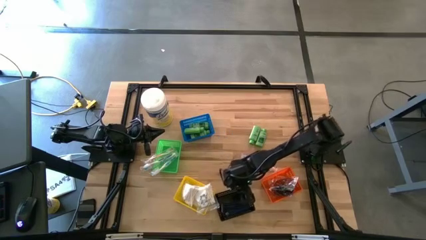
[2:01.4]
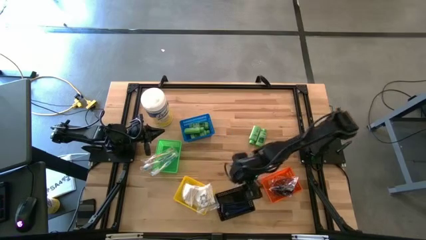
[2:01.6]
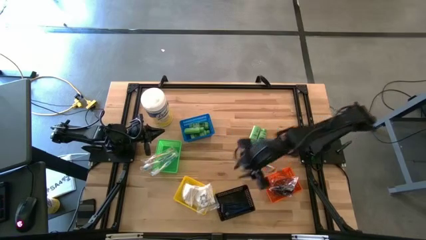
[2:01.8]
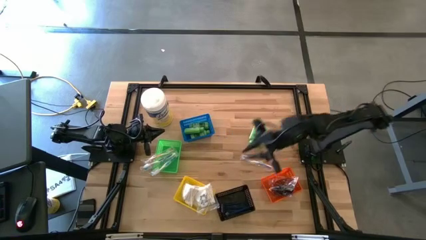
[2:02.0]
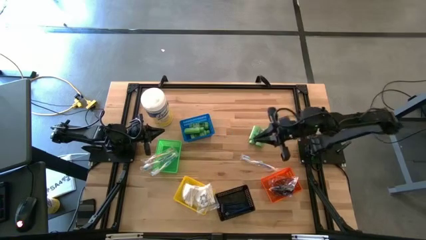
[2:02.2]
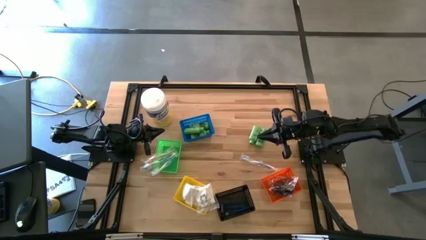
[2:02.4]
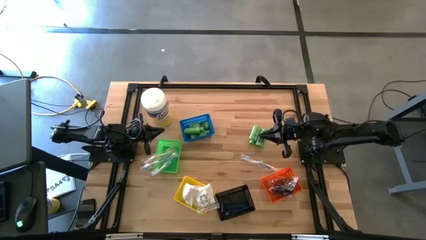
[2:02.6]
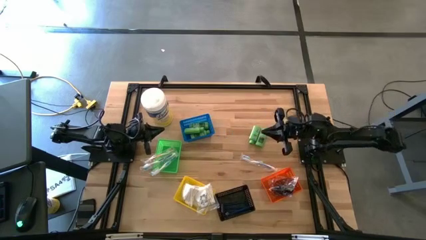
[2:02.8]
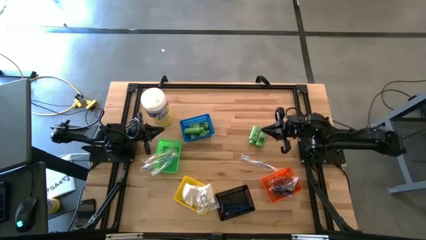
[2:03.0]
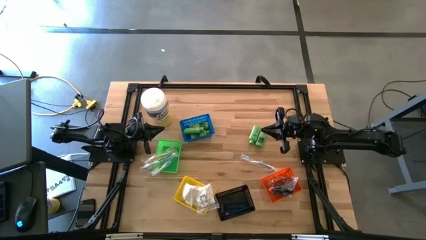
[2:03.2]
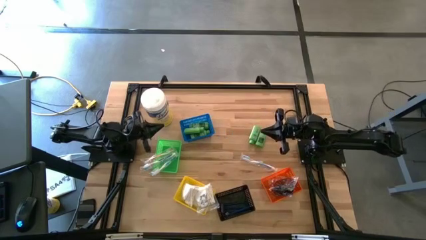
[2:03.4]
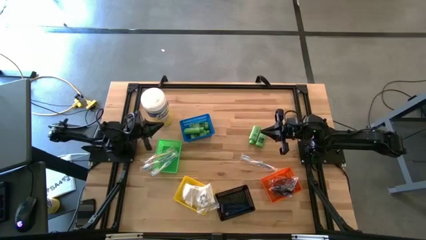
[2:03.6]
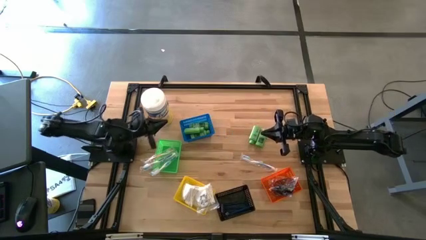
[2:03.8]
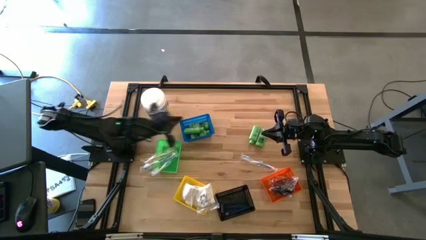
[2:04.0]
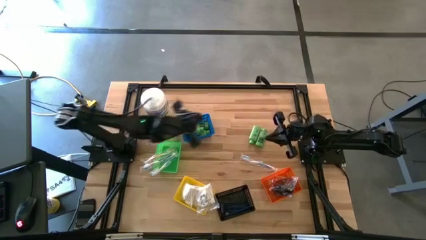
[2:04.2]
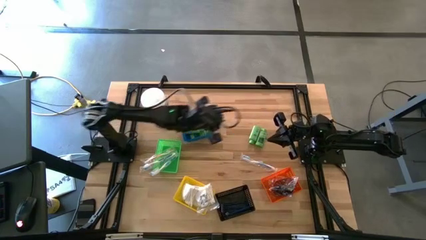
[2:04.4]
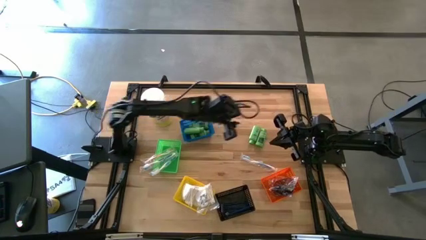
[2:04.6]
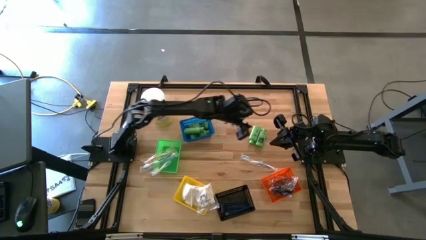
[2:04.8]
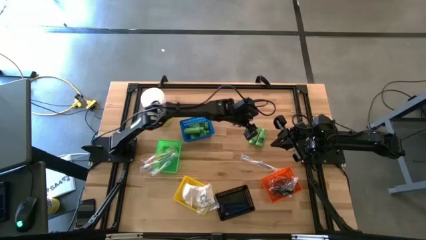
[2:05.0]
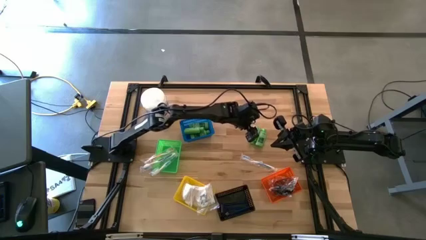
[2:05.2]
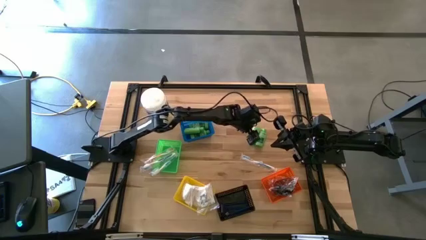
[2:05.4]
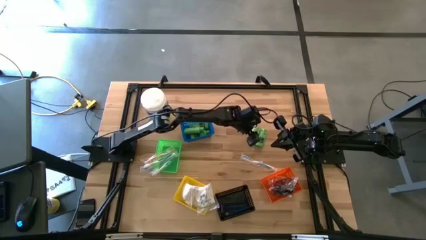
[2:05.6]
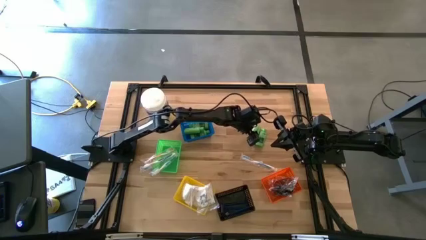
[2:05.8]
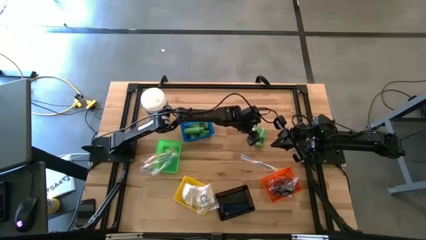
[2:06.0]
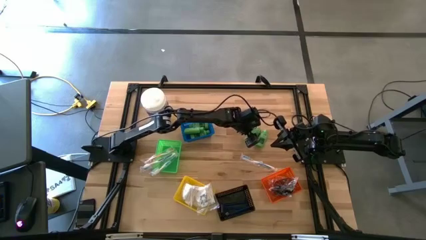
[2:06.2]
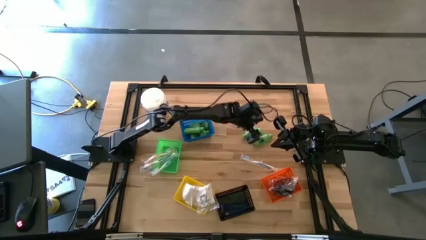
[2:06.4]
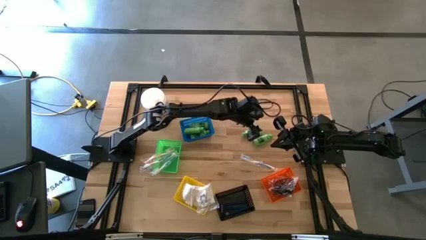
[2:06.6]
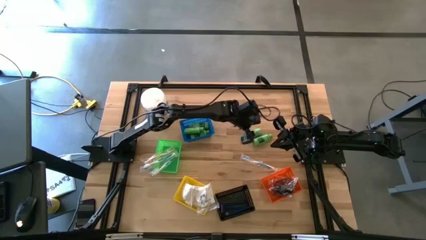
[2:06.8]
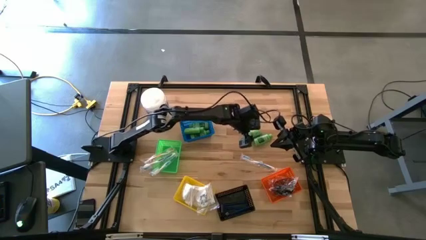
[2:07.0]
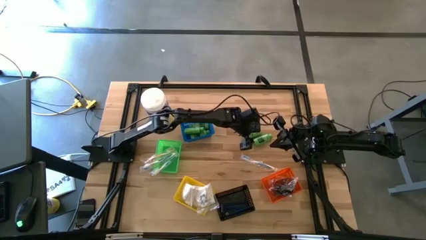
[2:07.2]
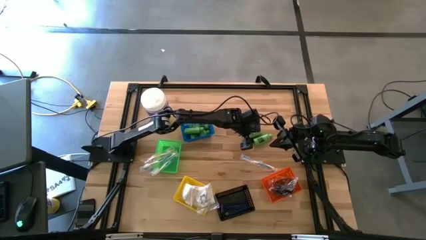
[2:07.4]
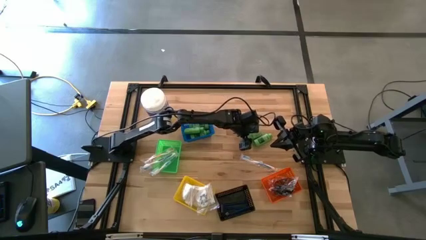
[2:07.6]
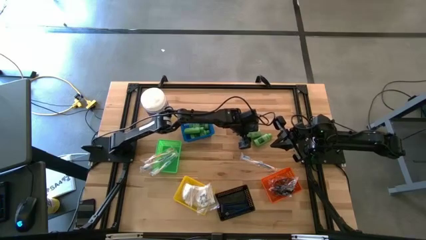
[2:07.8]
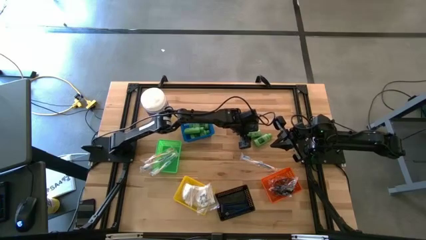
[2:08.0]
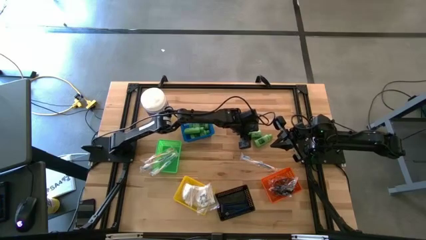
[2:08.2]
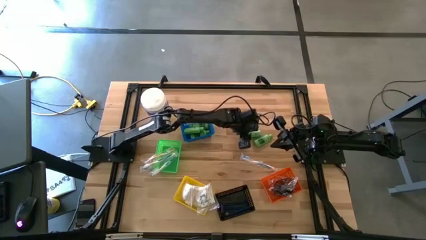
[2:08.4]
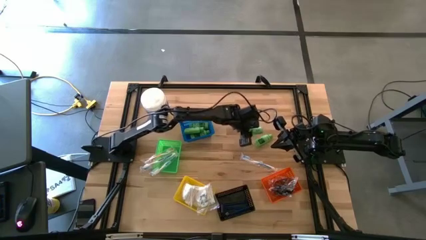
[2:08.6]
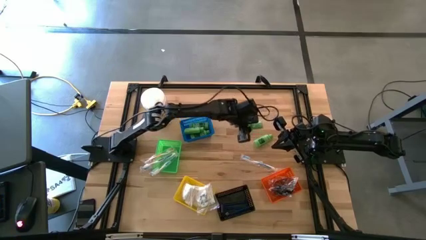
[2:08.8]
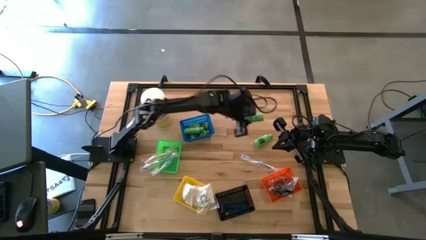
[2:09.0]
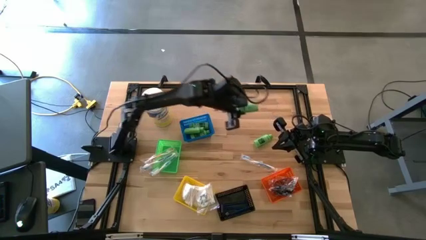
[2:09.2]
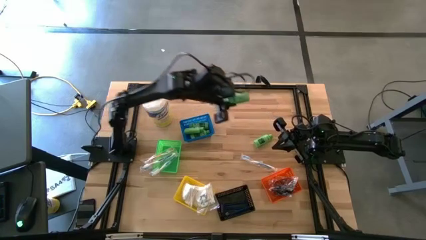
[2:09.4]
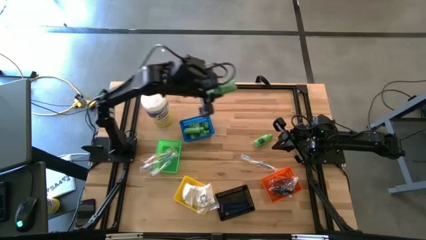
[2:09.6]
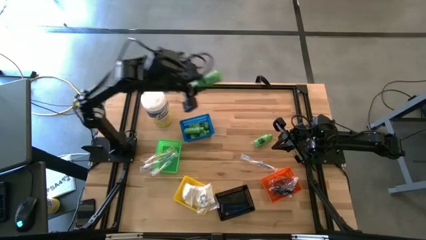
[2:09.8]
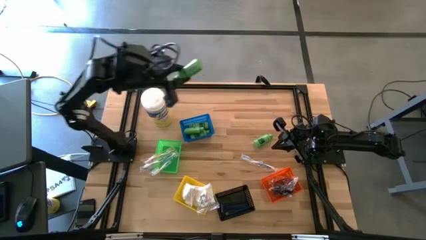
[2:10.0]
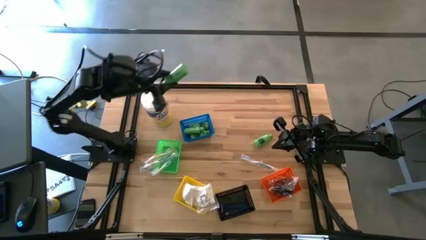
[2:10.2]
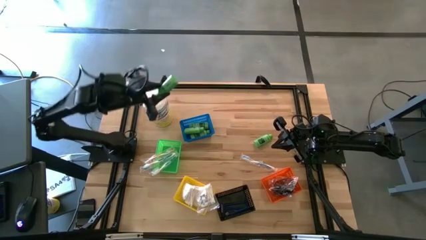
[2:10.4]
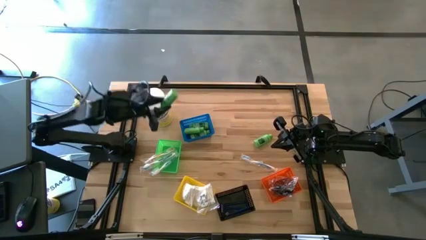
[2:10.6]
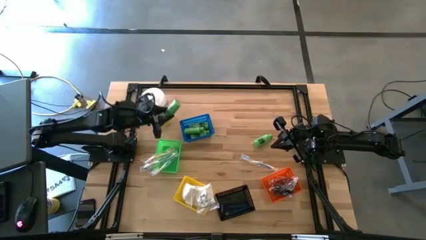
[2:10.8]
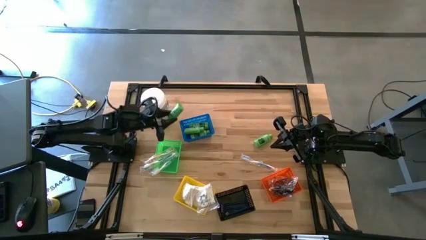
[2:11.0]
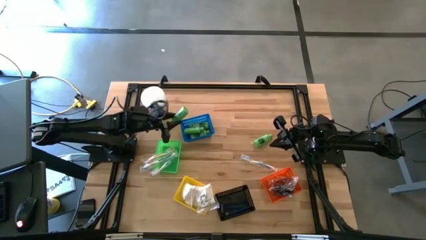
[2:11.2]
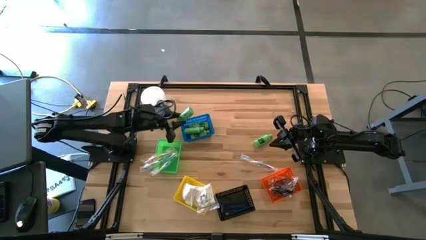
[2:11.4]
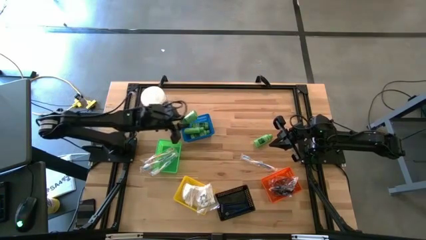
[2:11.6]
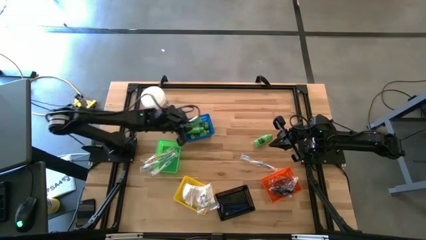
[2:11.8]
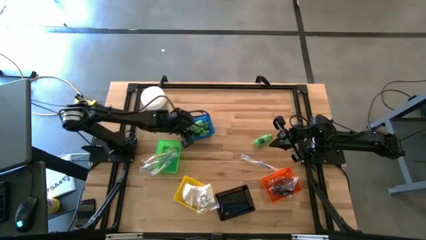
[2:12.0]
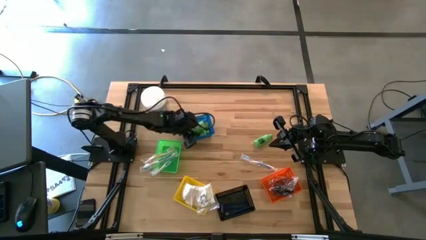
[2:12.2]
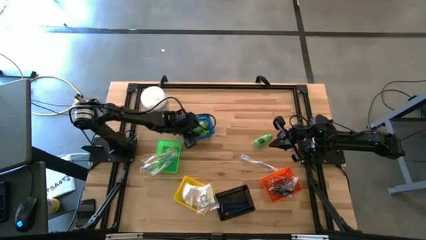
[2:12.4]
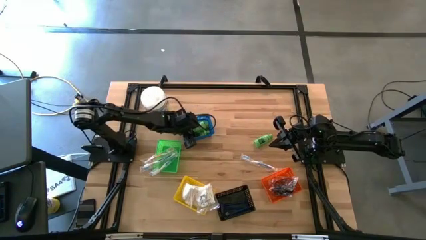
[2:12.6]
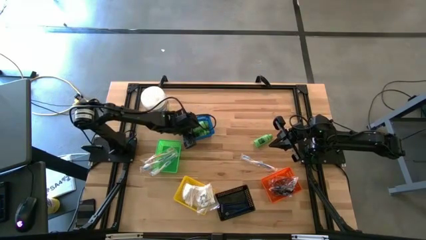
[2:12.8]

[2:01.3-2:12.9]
Task: Pick & Place Travel size toiletries
Put the green shampoo into the blue bin

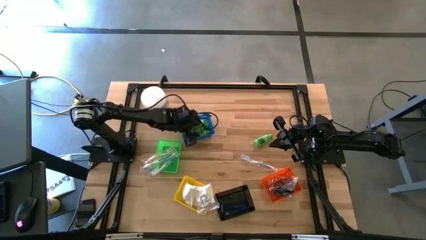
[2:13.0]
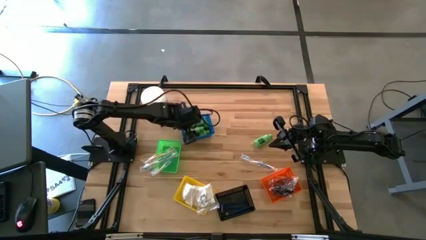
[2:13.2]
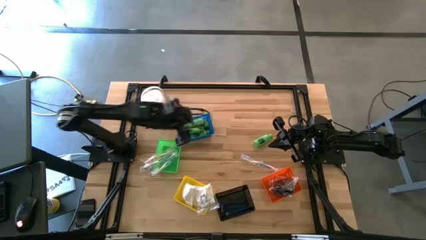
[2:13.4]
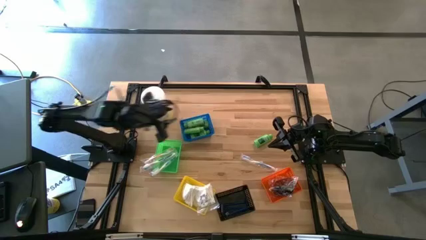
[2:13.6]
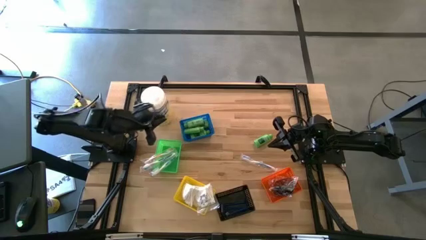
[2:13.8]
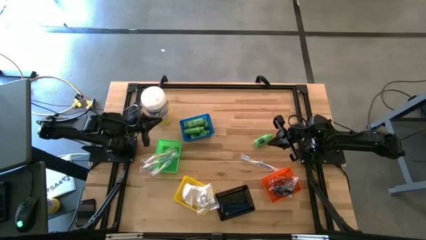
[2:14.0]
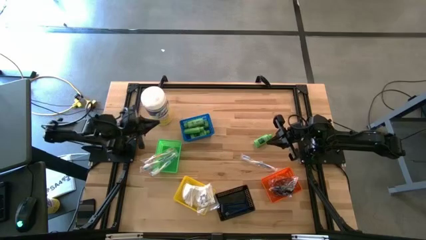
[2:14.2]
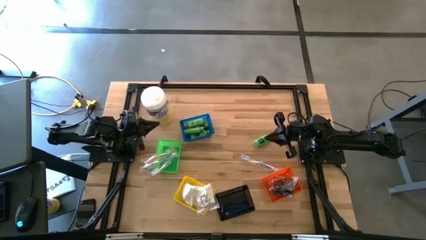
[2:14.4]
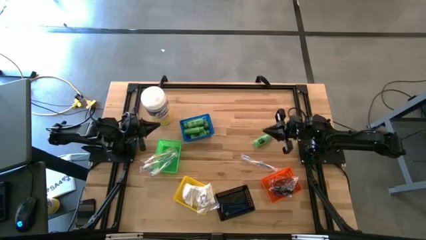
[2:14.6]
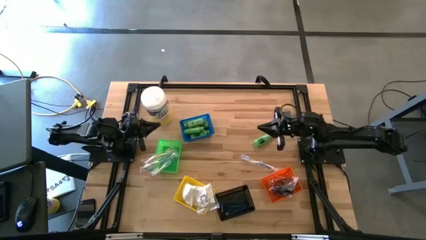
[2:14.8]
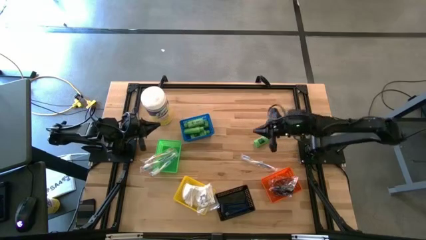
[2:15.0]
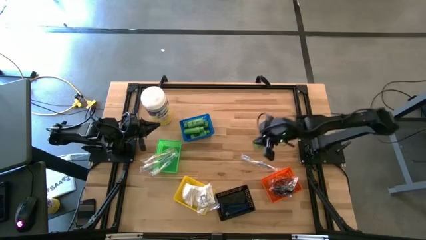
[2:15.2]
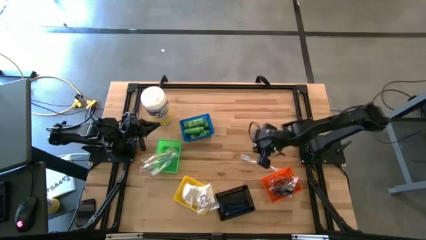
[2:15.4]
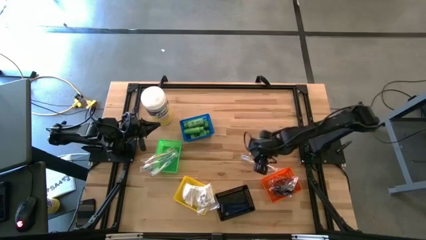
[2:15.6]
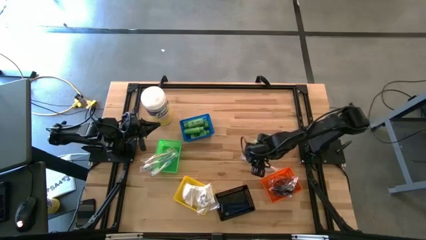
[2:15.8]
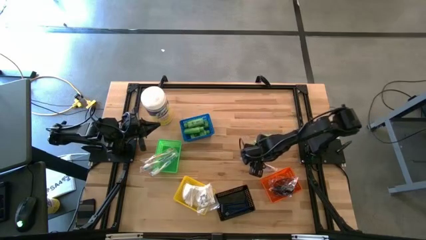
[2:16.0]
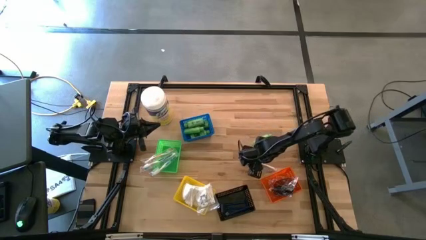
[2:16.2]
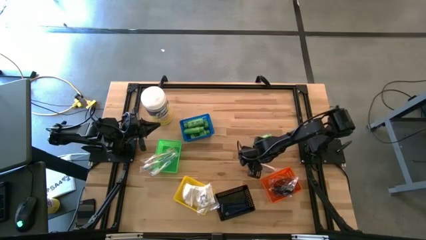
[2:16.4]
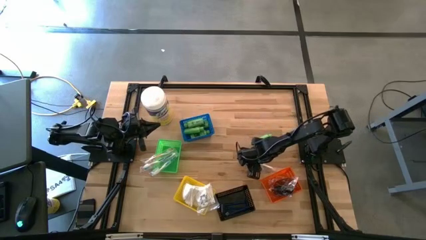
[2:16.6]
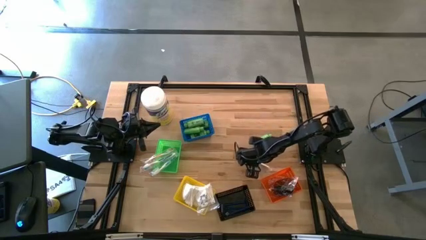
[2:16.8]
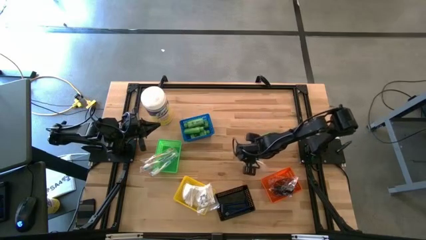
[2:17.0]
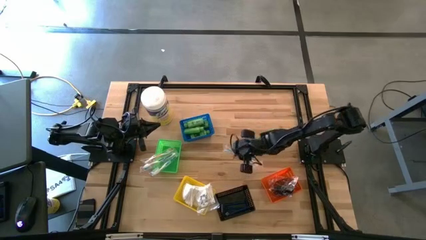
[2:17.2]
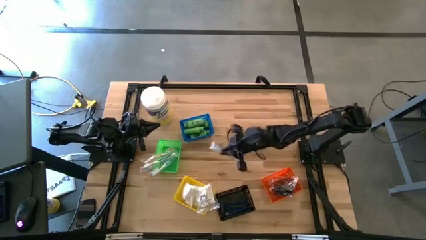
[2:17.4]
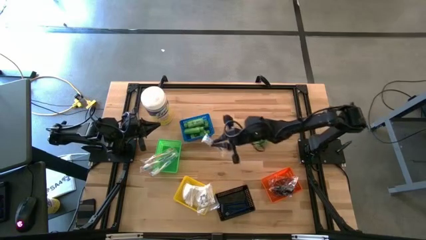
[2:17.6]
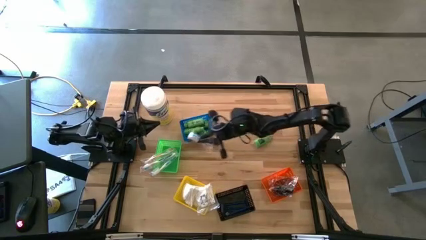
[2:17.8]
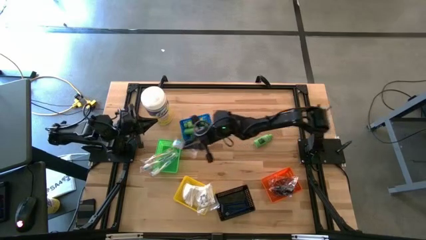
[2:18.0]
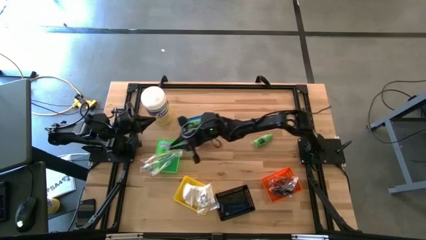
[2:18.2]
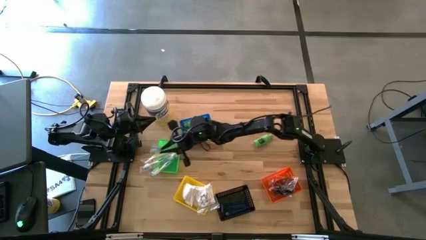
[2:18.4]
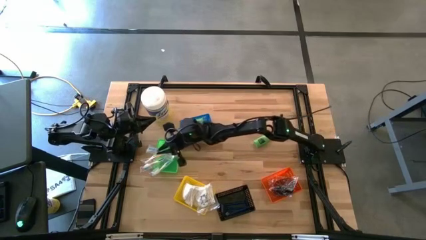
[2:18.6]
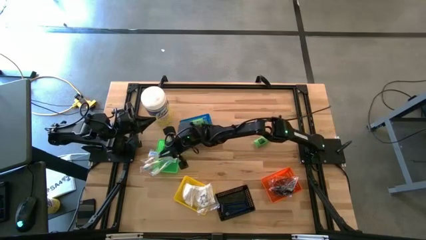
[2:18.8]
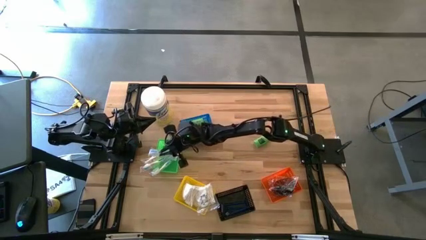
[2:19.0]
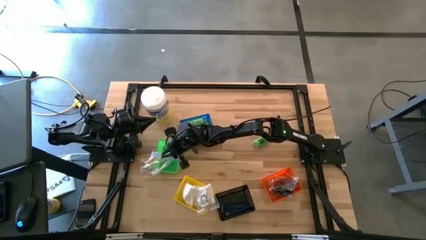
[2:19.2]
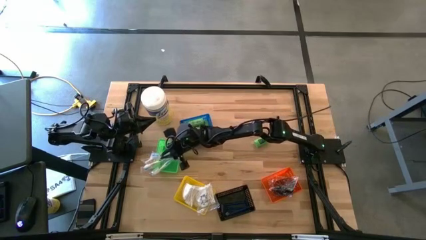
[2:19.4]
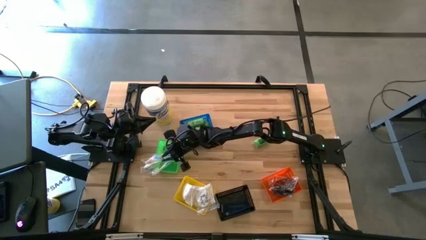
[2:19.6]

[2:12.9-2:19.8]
Put the blue toothbrush into the green bin
